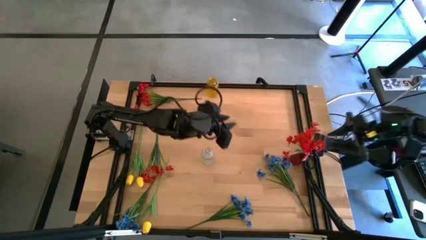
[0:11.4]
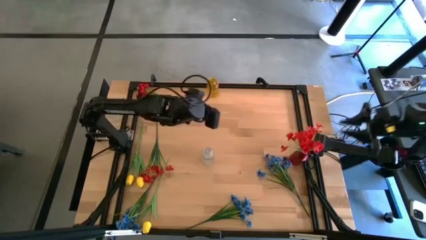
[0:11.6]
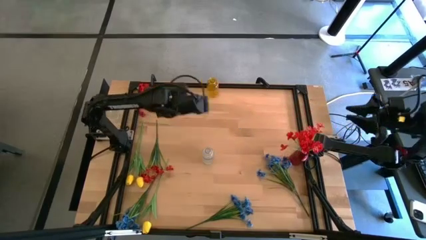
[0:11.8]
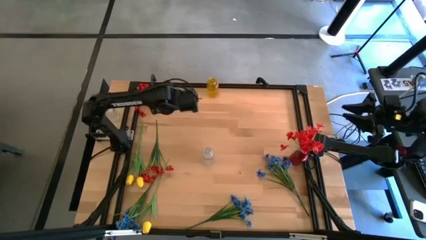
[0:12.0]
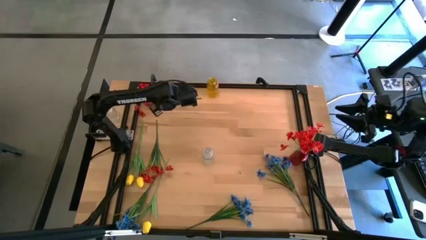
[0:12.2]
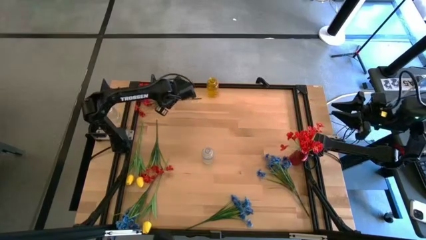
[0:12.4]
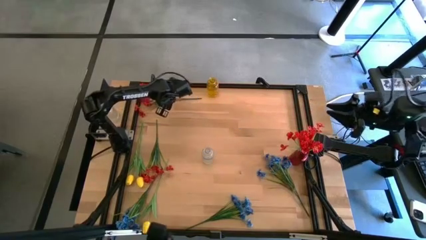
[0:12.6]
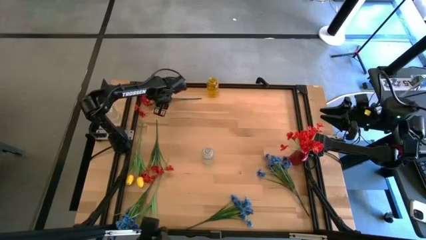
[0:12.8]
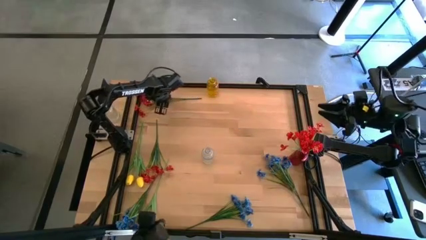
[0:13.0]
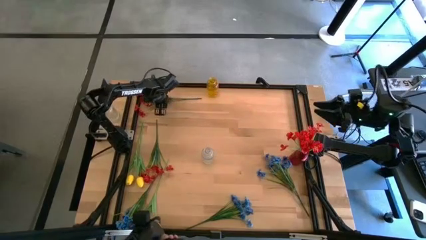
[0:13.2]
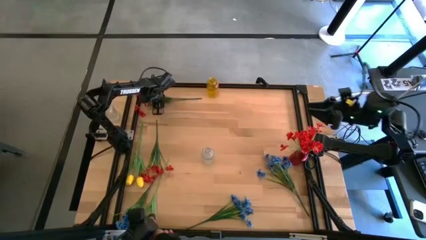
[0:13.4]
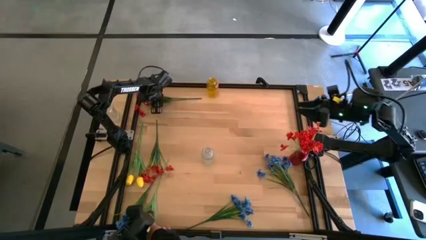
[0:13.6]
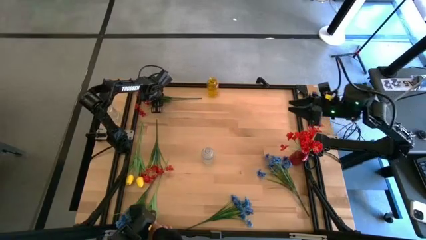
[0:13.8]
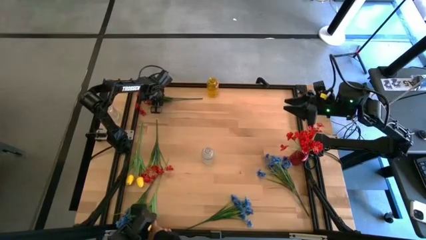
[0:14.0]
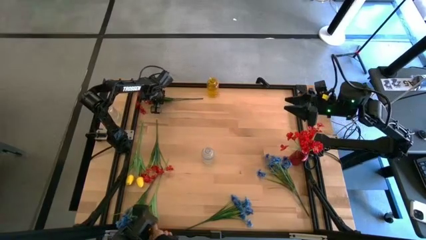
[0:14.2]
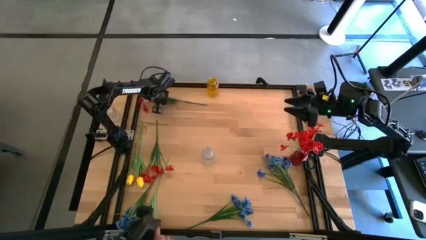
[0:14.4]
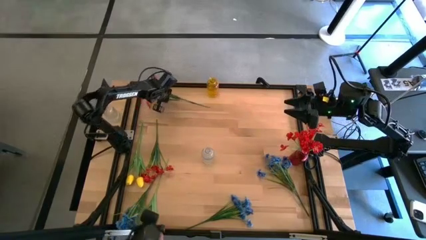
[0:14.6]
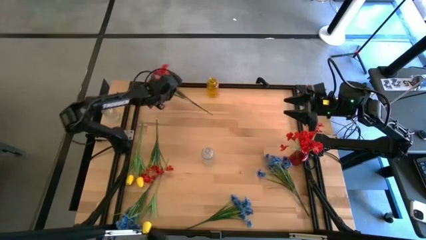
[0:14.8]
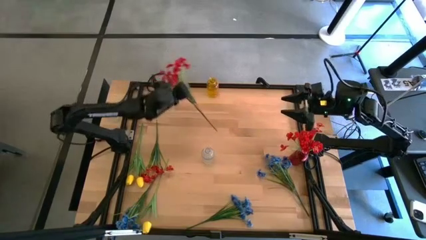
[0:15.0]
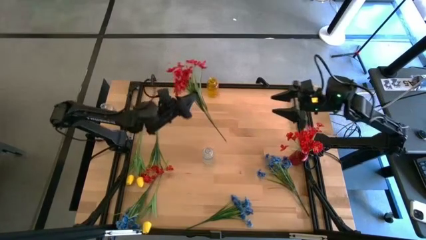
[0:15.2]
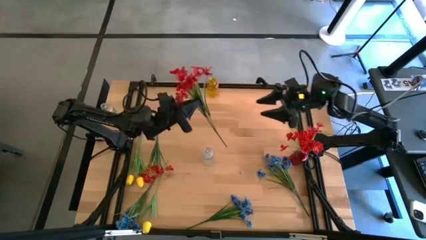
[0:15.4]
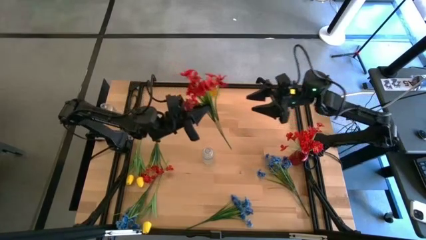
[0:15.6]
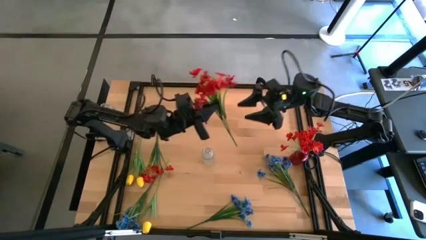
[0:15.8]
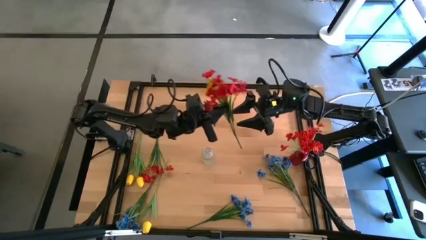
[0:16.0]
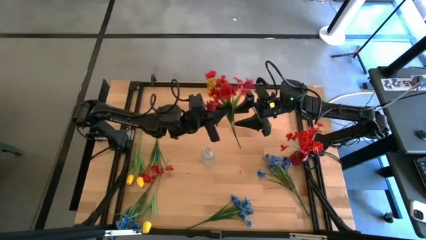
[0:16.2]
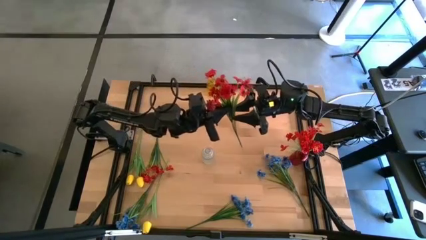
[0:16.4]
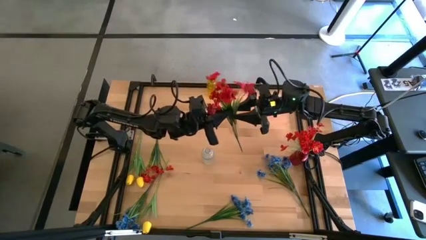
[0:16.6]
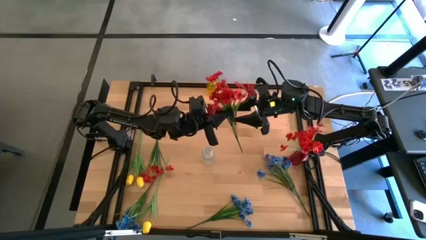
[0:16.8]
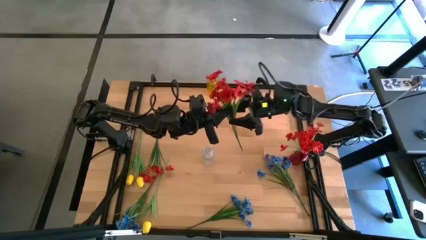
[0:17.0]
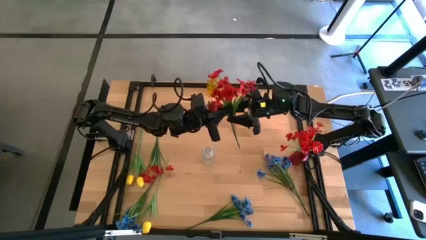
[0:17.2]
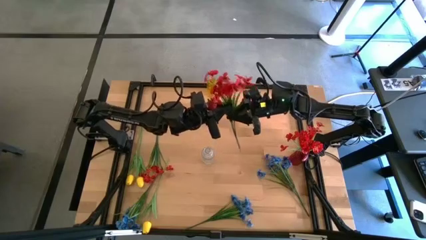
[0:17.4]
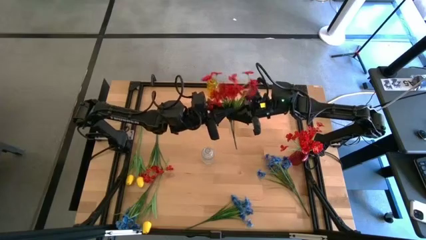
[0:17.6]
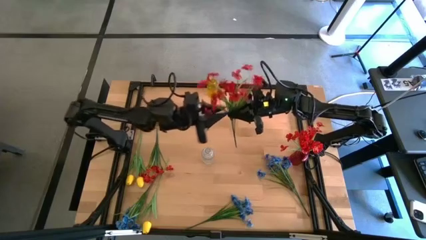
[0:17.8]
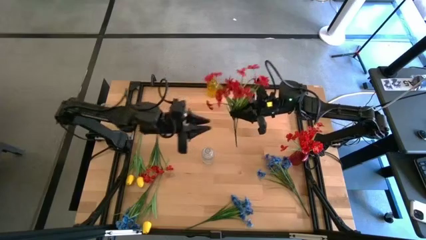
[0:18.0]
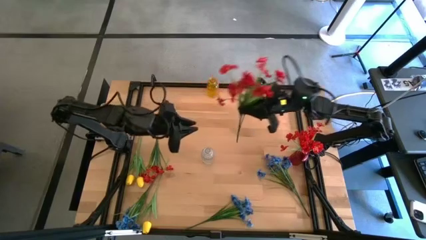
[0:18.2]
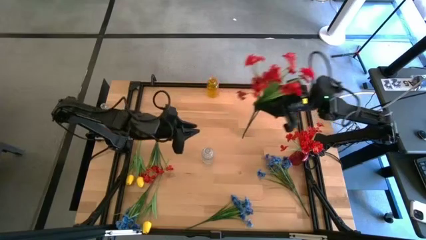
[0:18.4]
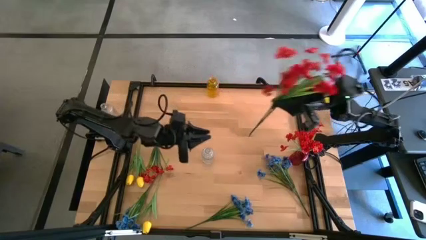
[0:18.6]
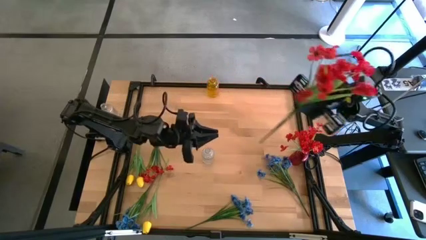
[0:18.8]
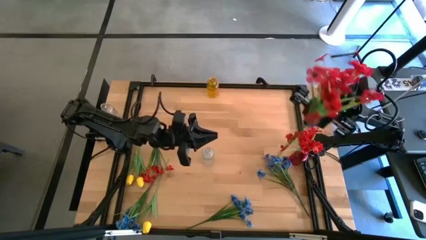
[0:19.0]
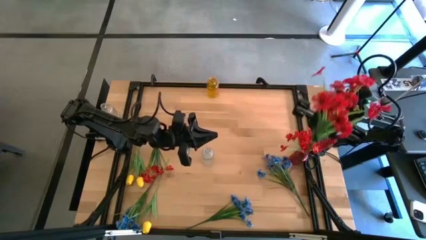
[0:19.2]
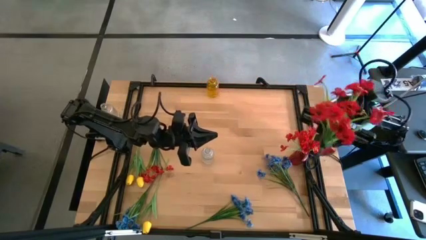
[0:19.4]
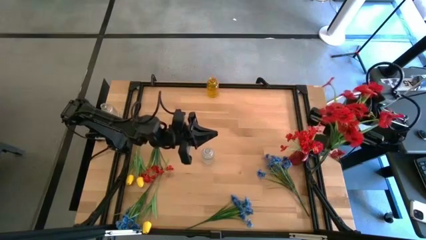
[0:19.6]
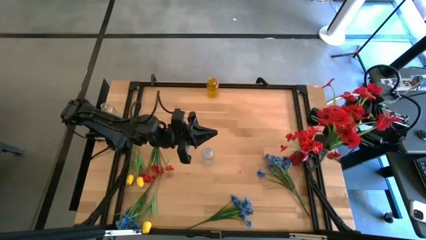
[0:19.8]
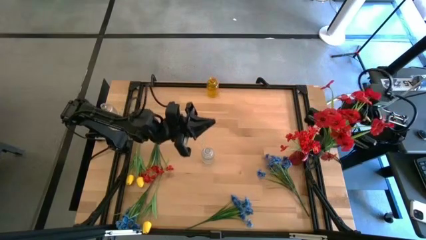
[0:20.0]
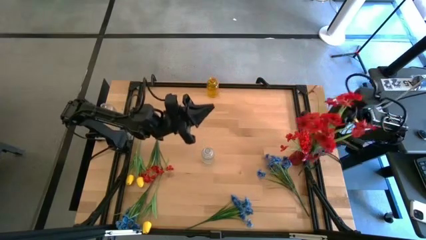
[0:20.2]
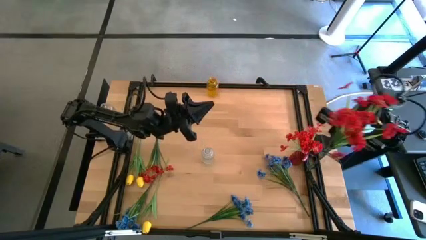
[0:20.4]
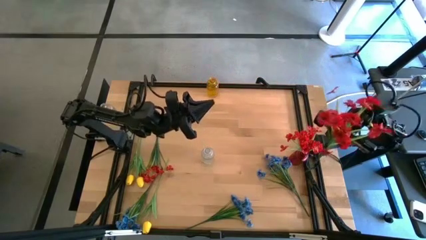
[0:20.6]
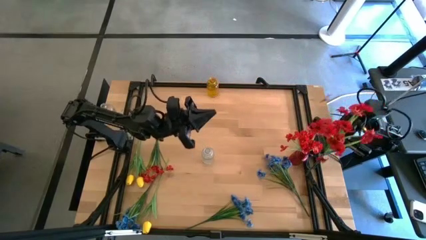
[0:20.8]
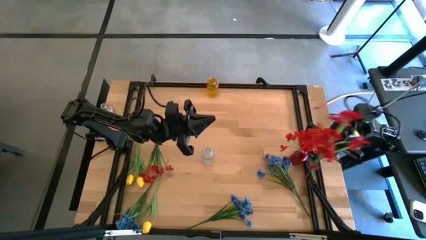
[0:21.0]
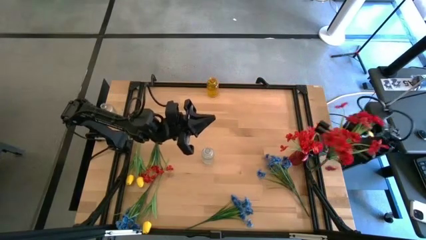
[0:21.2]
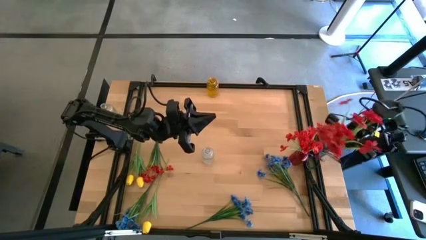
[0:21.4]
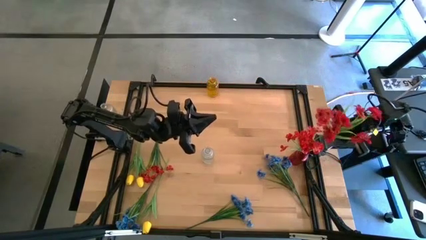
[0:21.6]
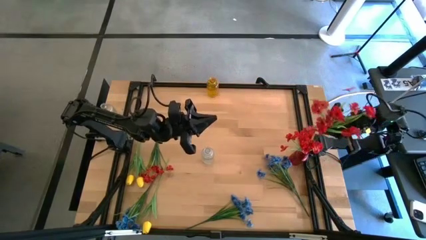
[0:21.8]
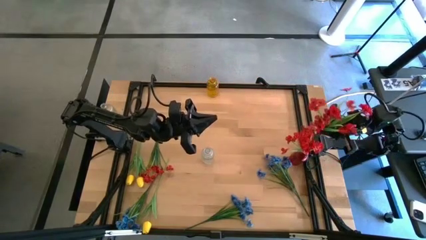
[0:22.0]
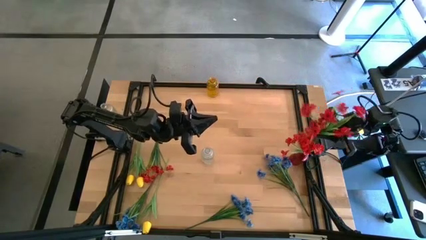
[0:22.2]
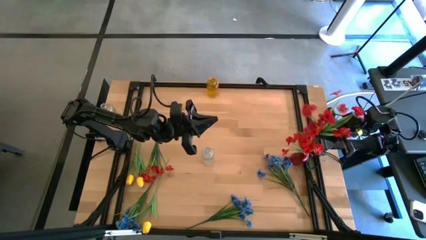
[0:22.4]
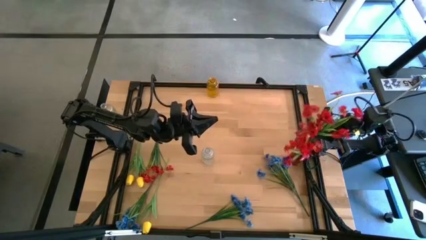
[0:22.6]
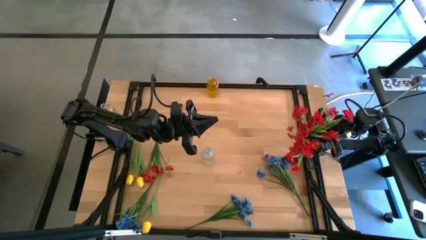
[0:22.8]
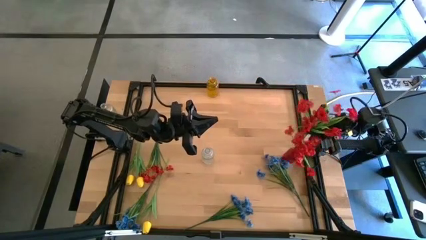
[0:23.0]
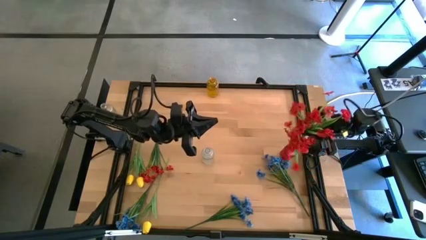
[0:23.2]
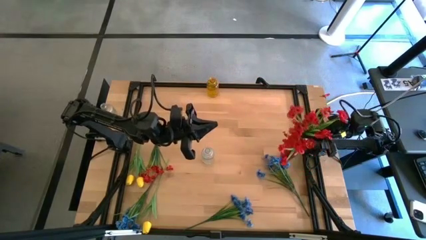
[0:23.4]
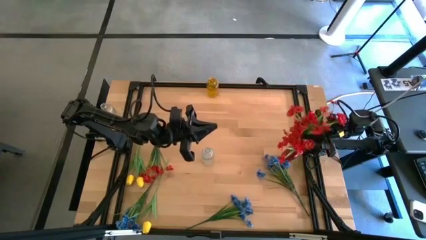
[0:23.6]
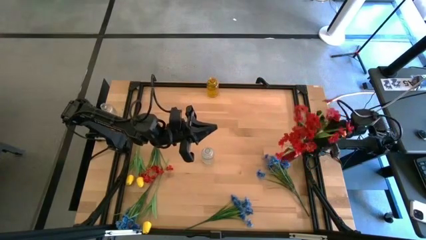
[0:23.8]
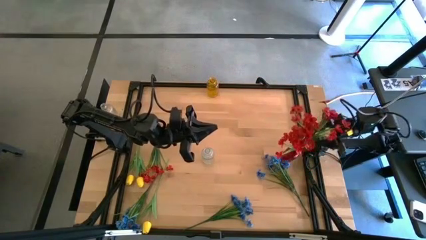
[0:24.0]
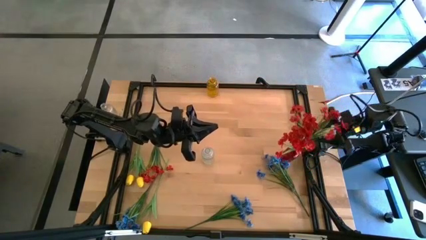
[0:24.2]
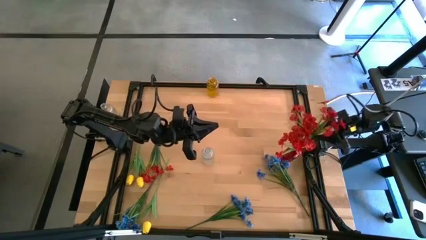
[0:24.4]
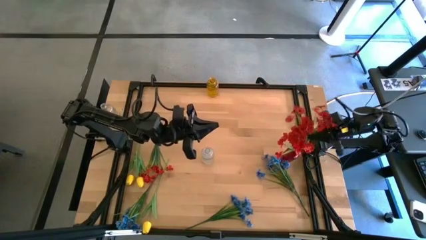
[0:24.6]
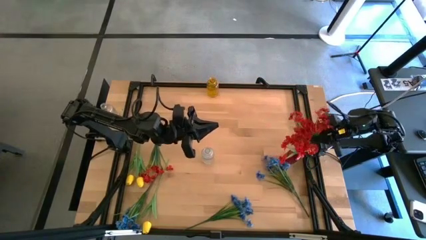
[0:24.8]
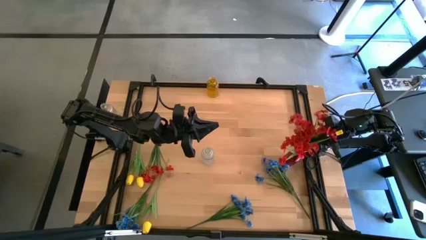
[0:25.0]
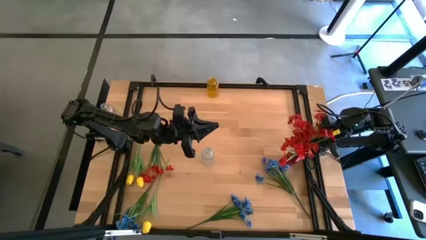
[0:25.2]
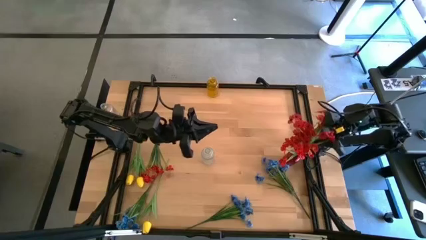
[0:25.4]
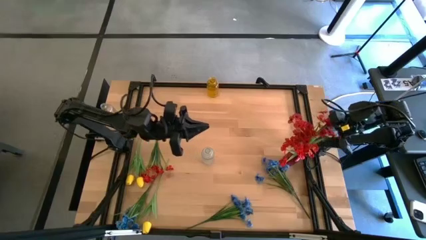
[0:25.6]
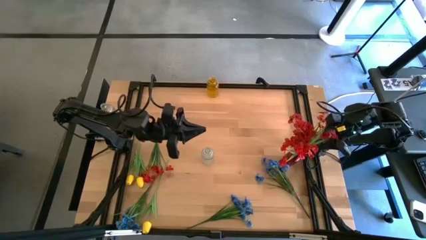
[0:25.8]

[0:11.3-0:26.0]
Task: Sort flowers into vase by color
Put the top red flowers into the red vase
